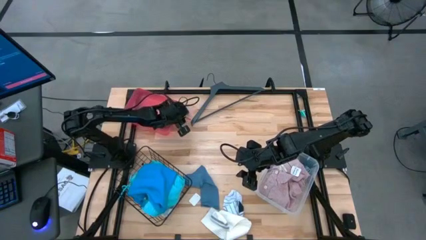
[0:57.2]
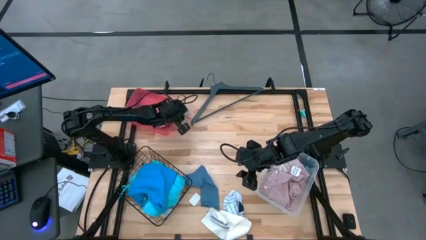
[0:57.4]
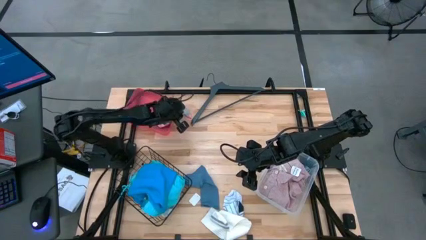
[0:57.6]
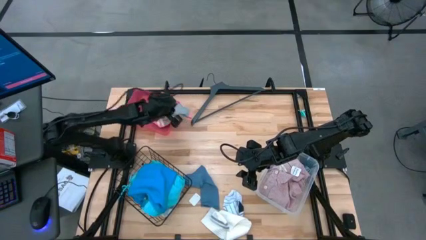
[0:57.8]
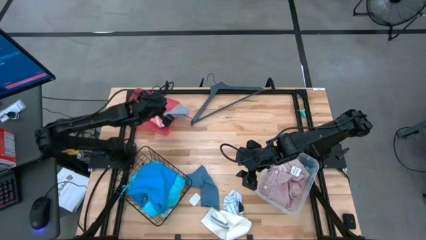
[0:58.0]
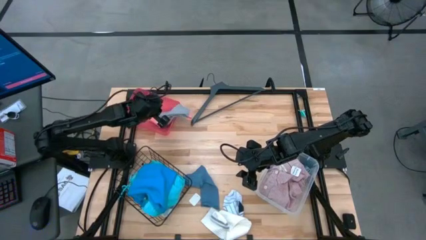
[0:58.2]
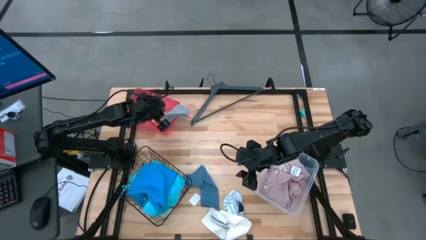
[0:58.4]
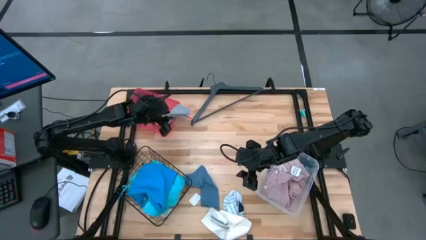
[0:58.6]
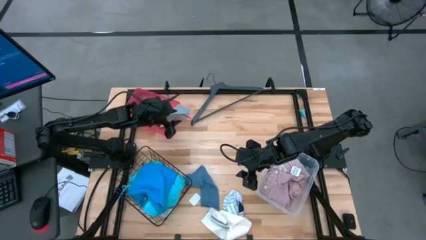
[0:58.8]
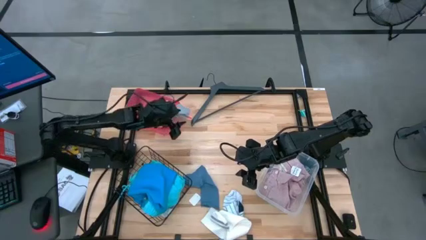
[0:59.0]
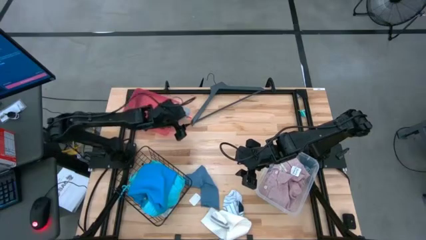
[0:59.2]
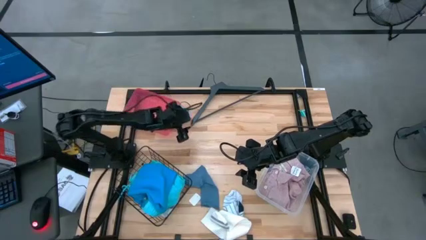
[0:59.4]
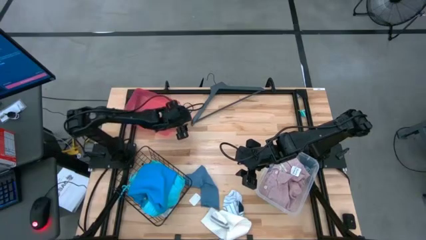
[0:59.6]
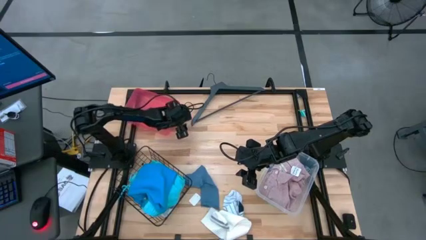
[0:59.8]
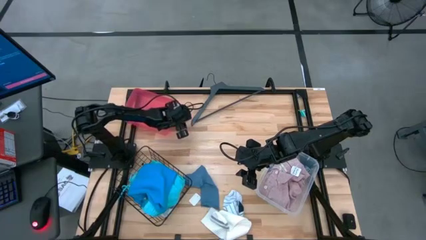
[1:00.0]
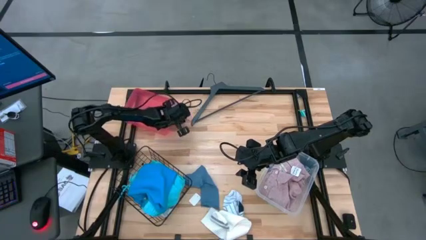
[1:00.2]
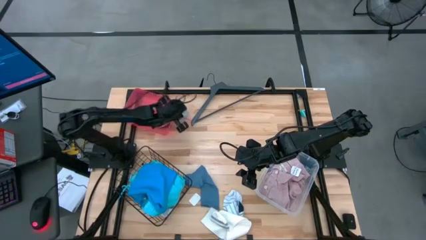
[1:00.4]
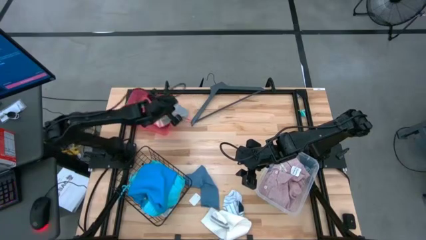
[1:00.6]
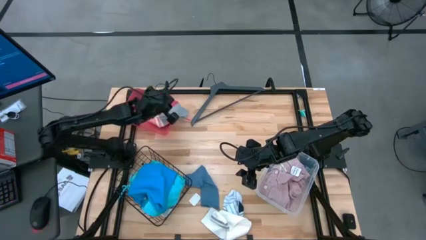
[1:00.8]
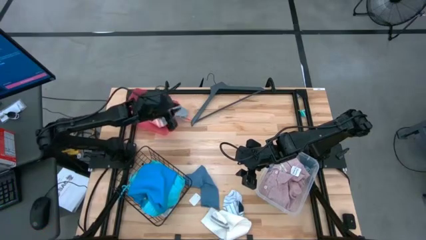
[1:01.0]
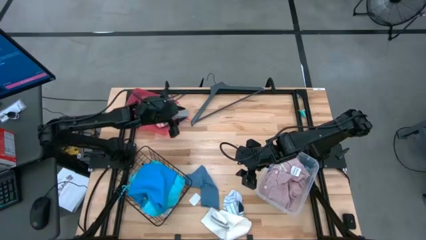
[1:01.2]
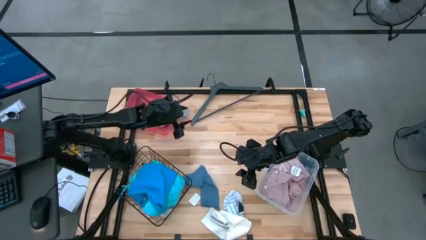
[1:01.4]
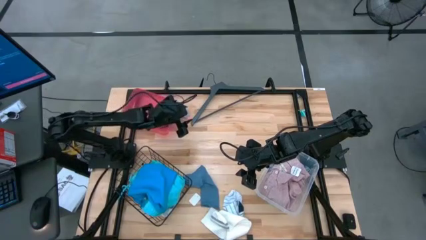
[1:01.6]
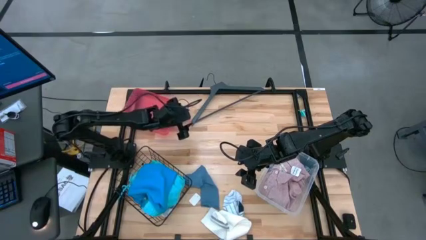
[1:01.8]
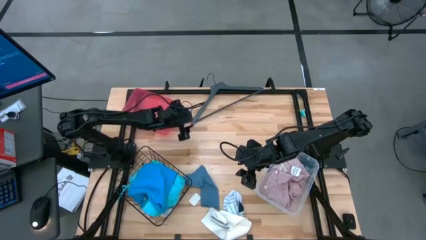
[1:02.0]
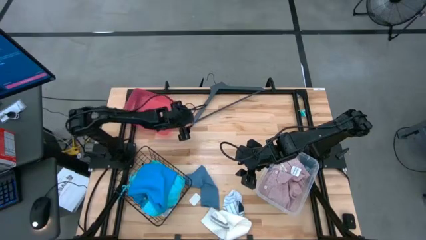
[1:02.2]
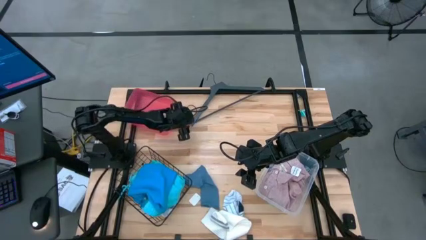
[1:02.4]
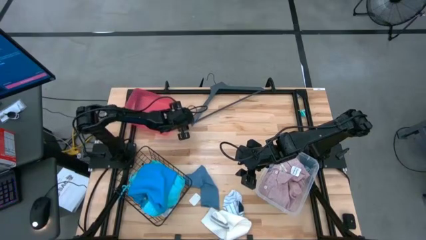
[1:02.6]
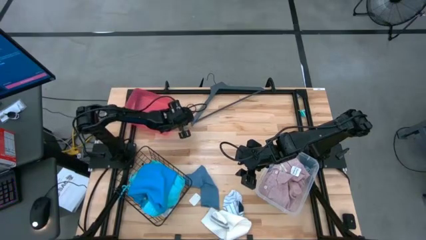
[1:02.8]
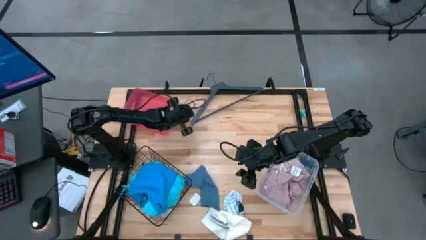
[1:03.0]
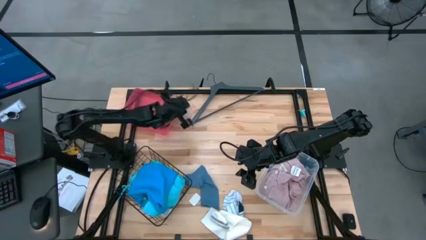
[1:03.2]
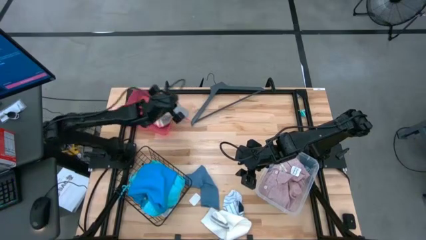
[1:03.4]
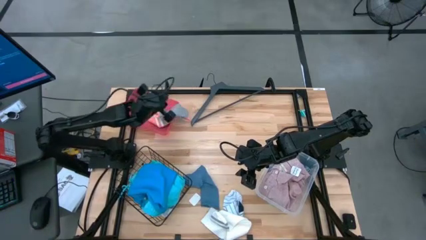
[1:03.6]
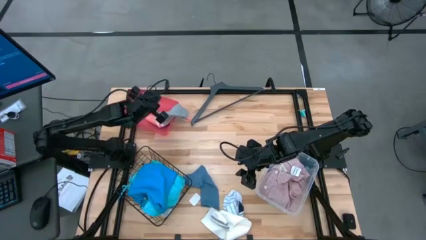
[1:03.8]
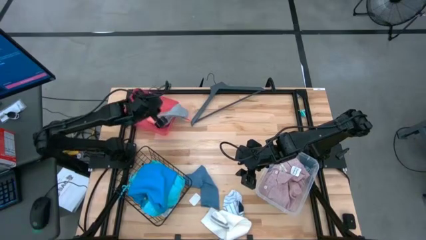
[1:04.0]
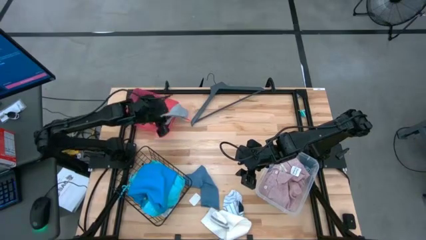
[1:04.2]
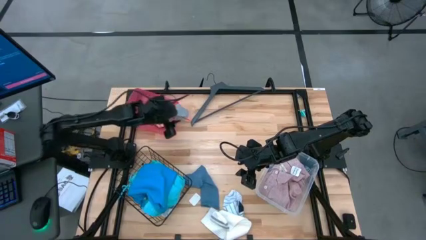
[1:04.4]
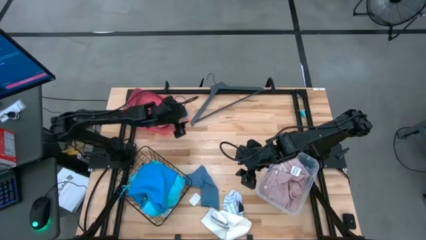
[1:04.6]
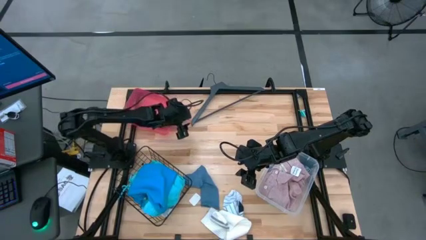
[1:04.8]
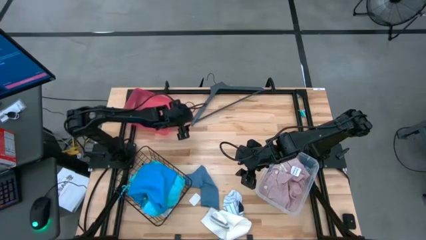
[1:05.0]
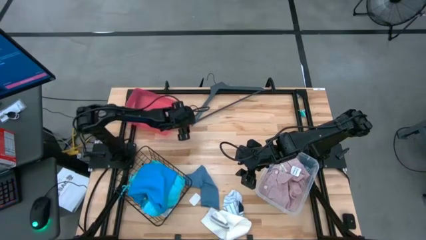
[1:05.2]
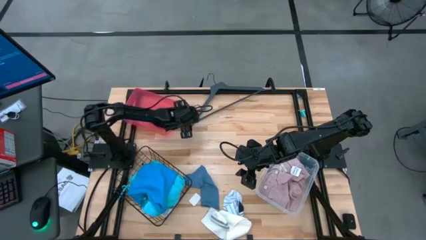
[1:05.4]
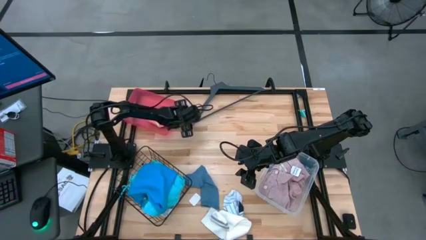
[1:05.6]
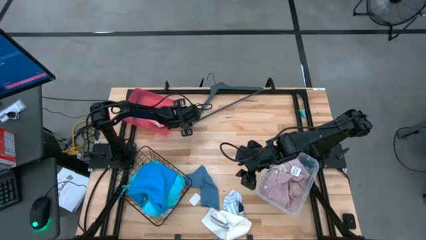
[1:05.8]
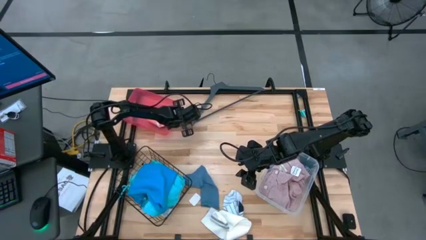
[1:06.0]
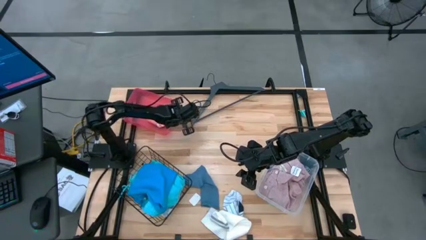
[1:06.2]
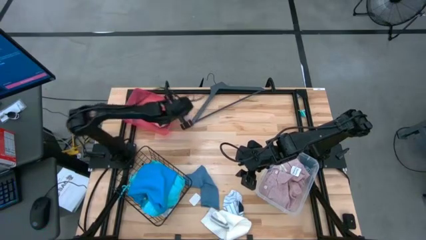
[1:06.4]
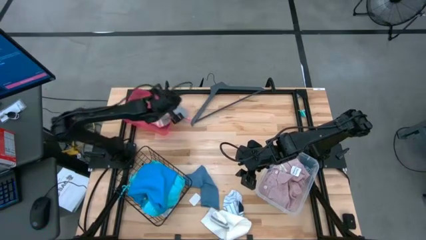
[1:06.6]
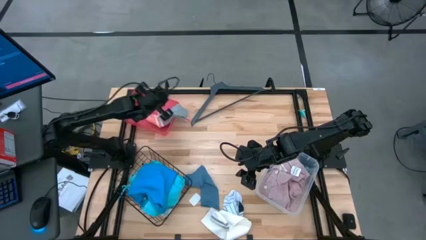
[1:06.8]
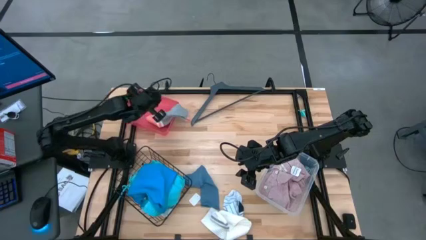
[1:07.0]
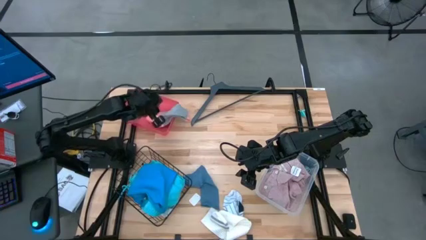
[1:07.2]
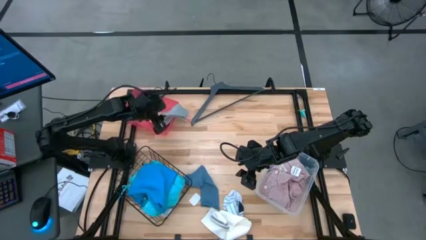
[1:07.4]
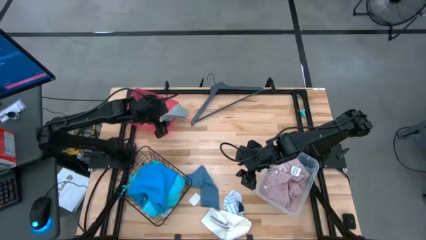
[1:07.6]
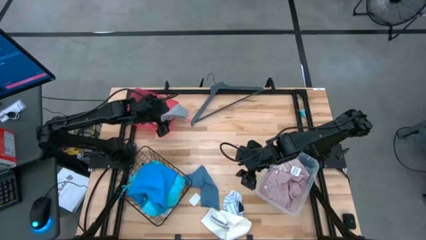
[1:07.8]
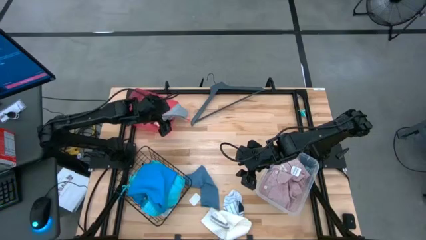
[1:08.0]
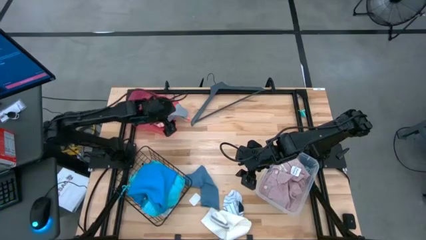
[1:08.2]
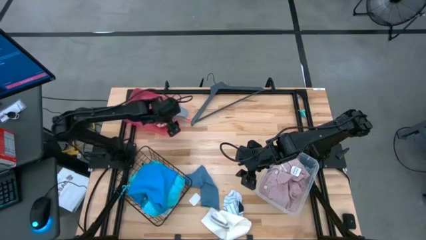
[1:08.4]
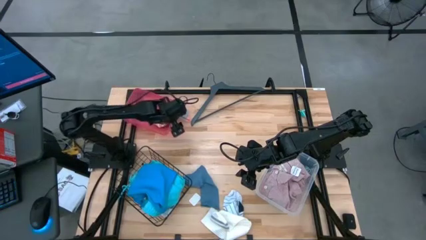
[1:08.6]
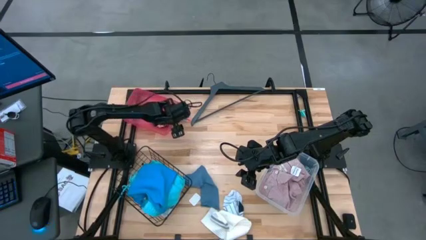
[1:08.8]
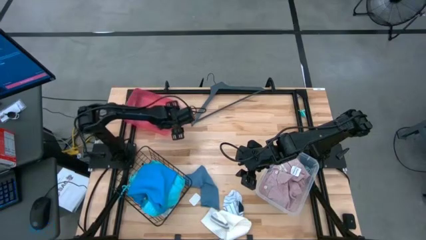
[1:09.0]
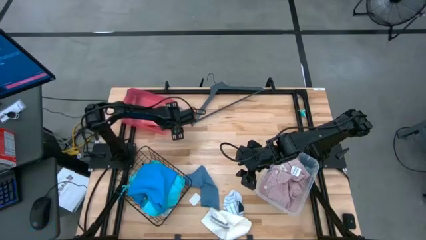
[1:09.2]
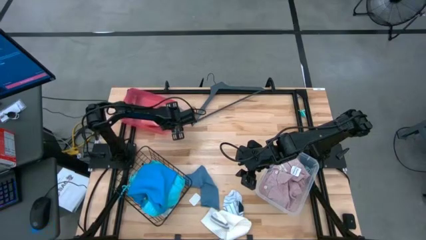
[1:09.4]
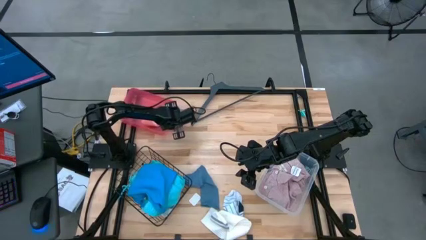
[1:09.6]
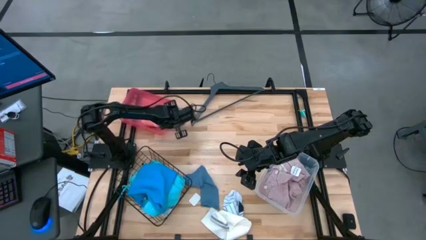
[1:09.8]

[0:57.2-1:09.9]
Task: Pick & Place Cloths
Put the gray sock into the red bin

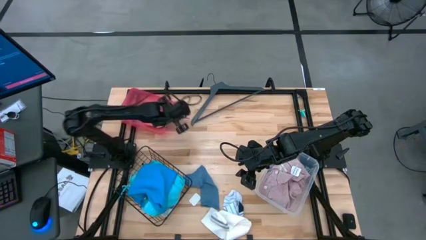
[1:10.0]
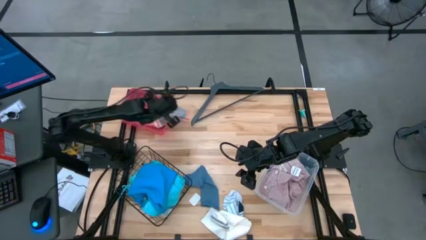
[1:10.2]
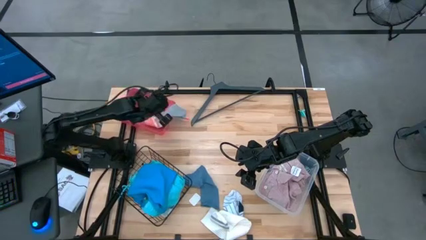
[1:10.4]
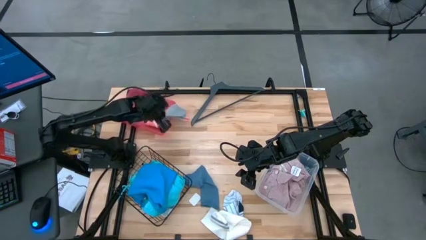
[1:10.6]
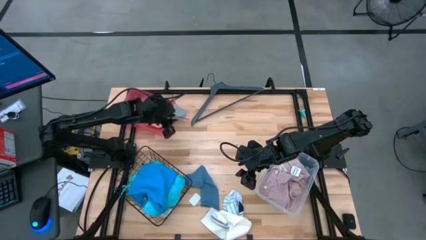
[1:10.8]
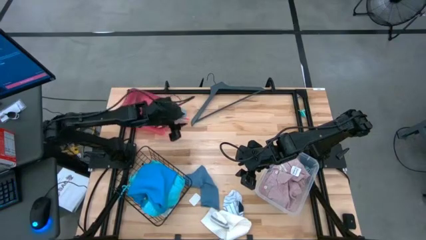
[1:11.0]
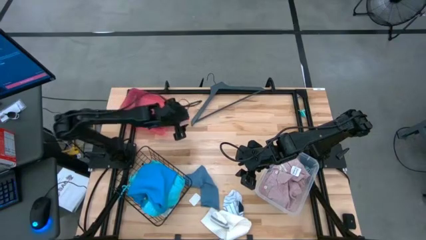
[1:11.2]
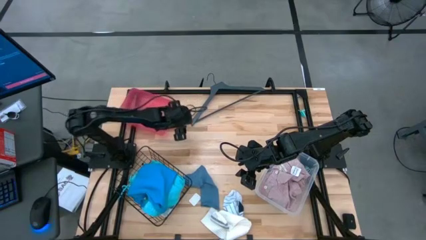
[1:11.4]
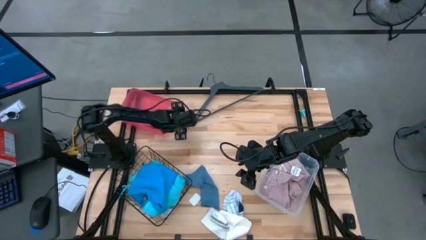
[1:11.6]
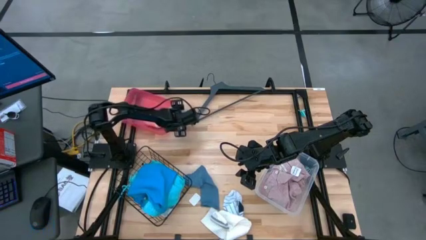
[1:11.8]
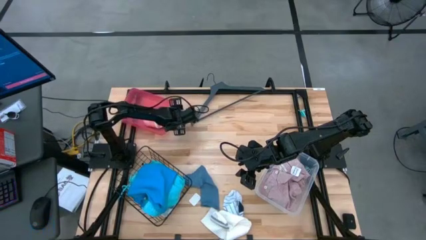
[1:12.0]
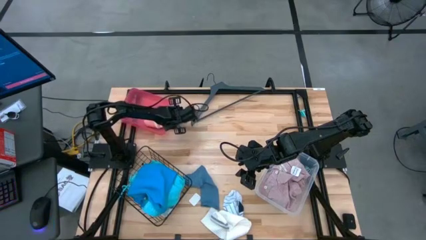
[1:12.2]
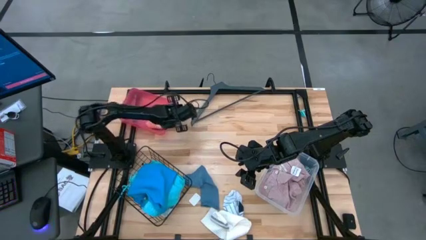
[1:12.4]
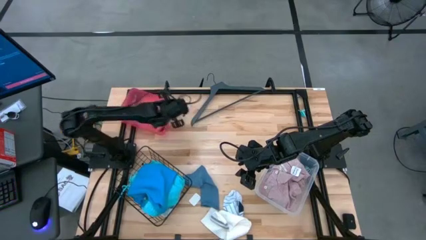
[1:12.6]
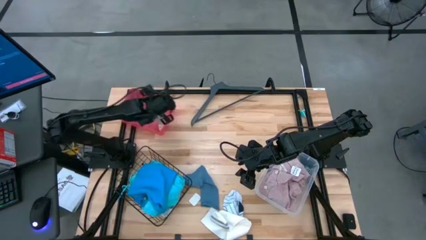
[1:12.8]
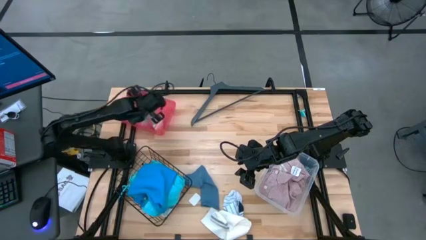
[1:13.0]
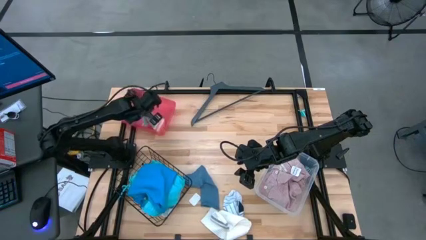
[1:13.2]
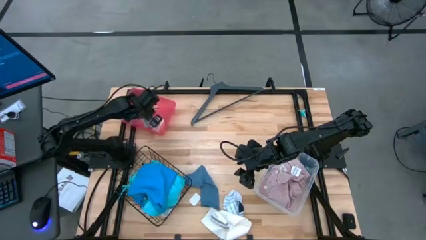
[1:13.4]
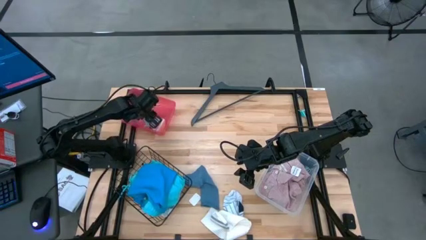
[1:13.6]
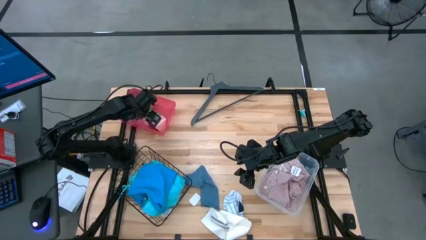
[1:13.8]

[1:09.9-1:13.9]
Put the gray sock into the red bin
